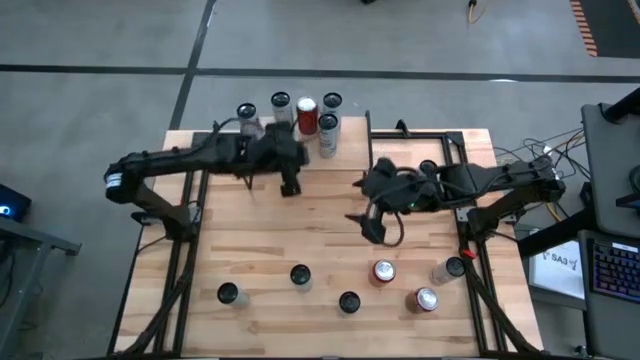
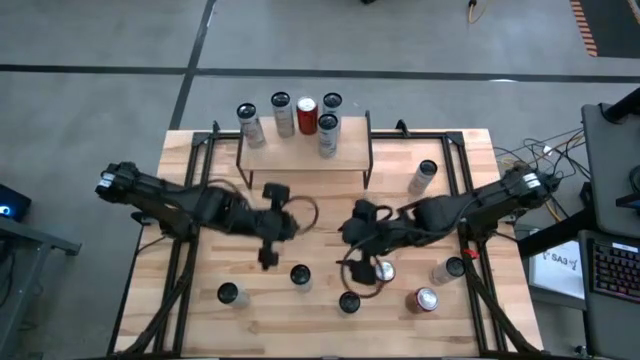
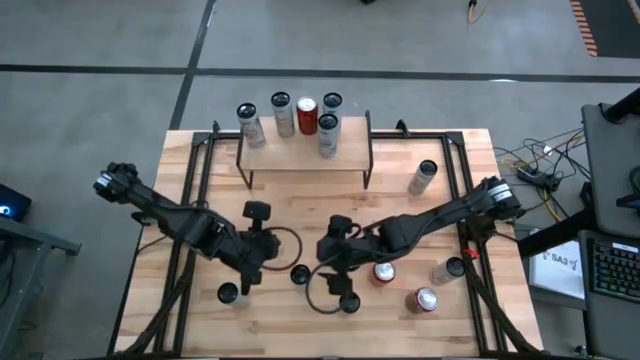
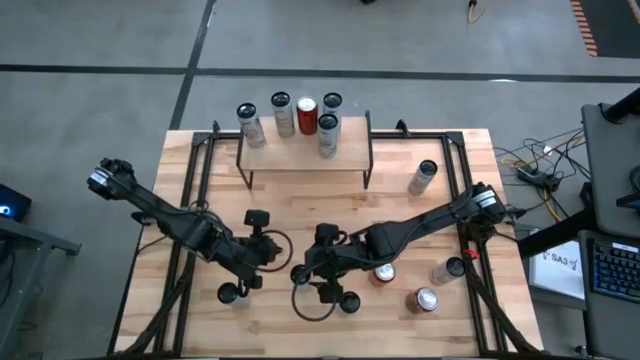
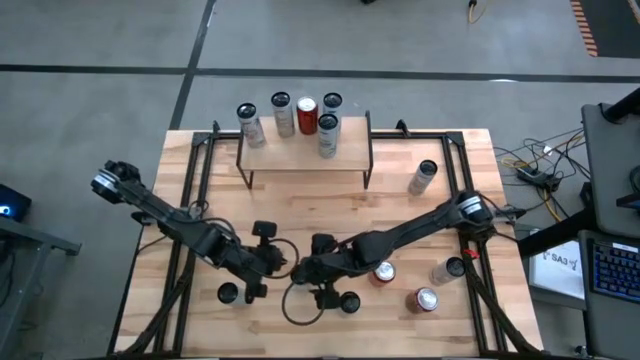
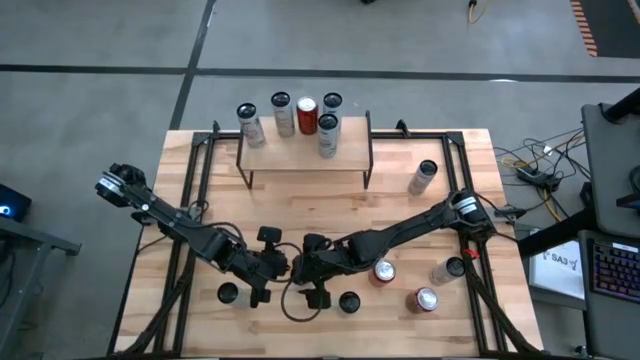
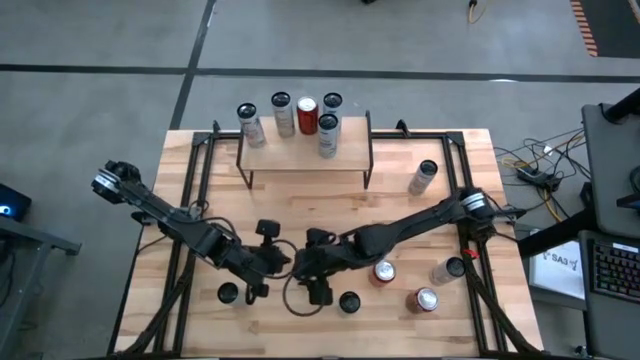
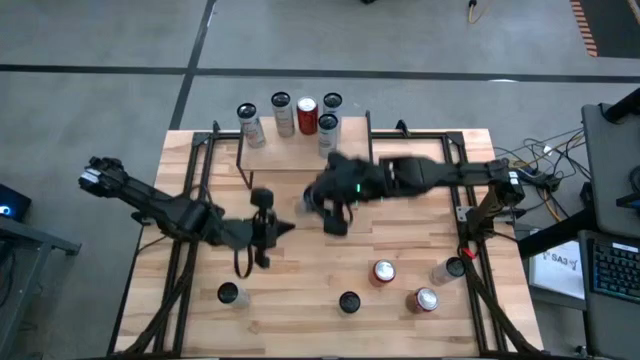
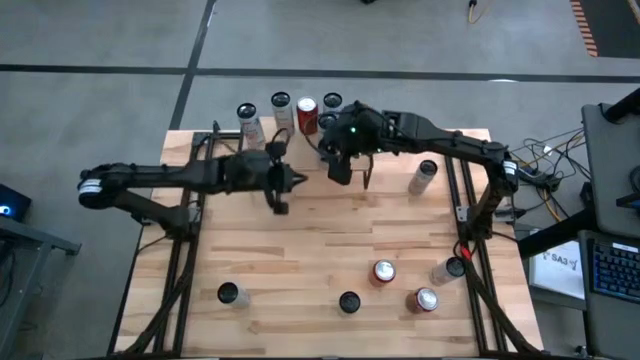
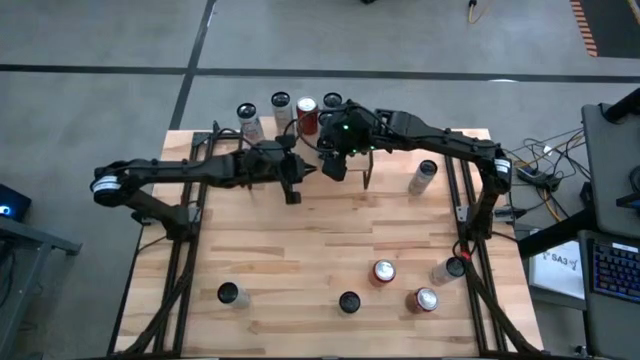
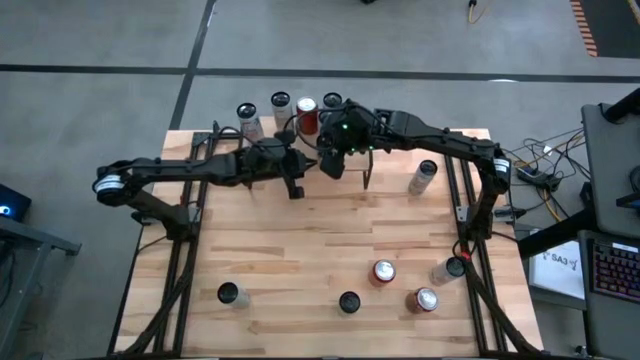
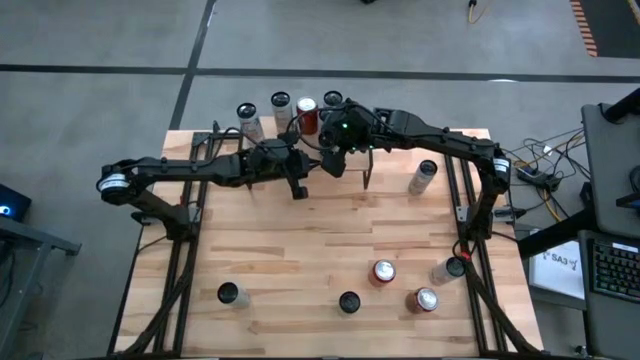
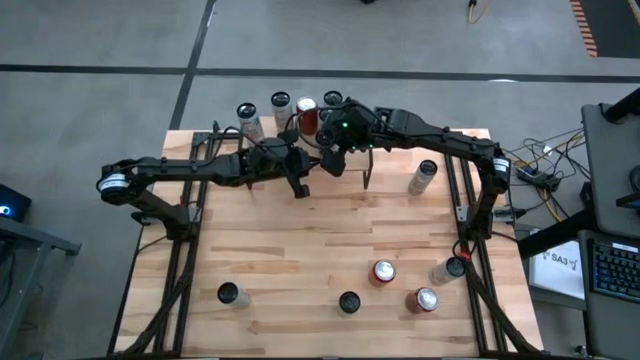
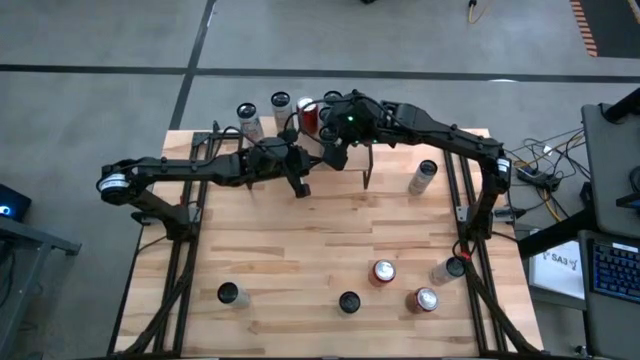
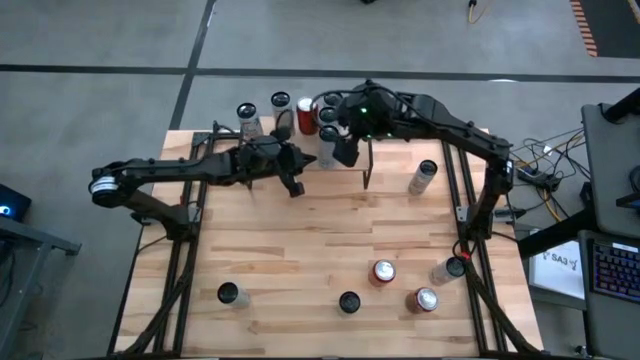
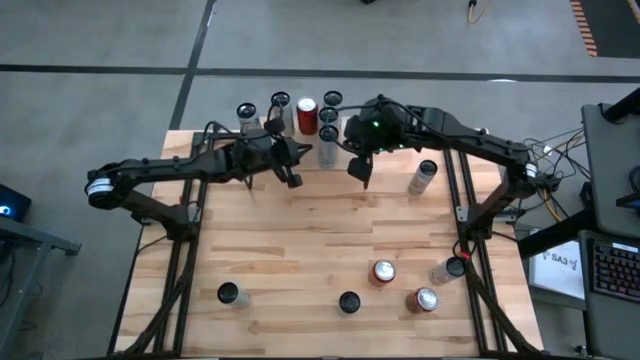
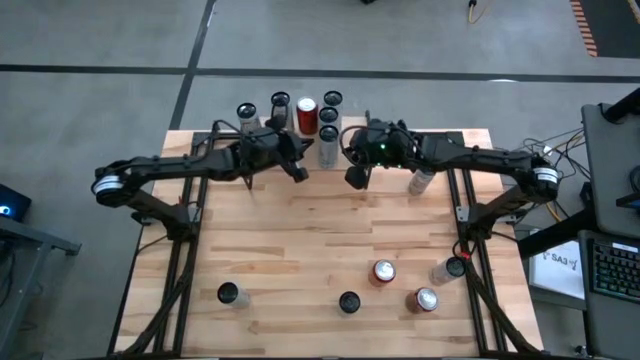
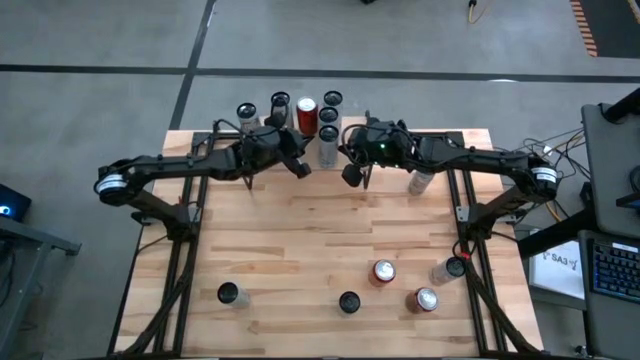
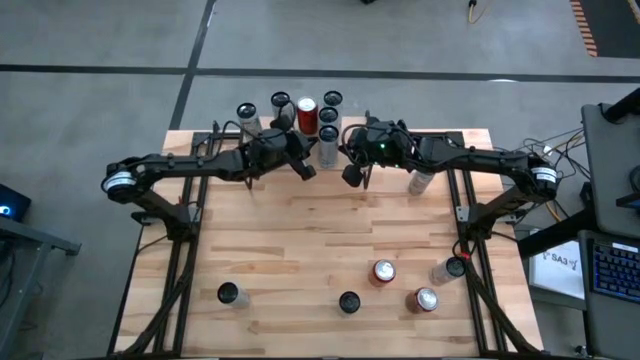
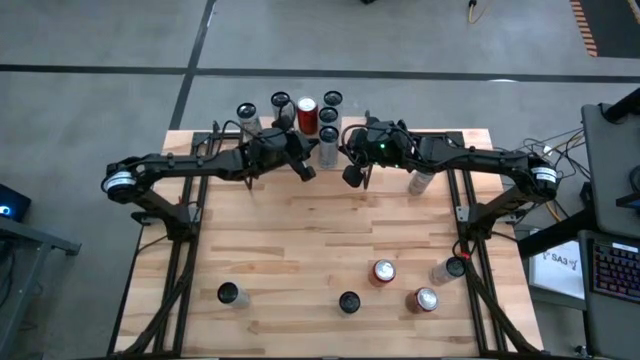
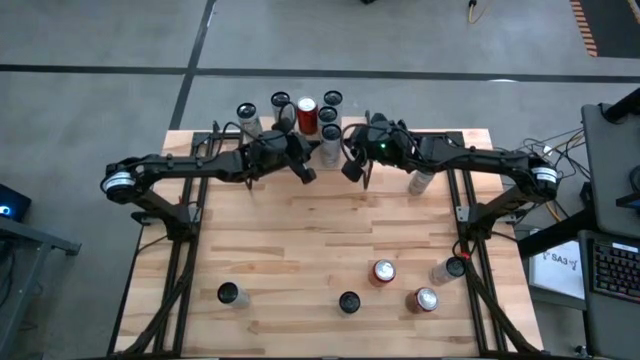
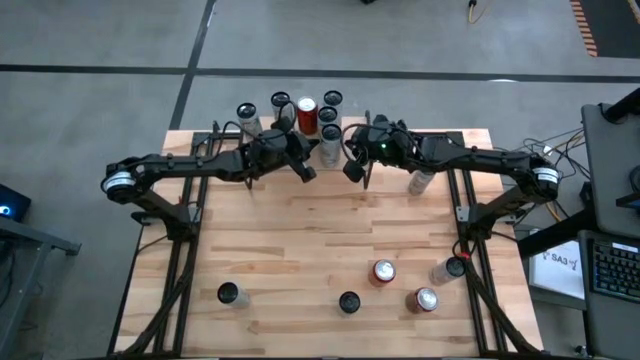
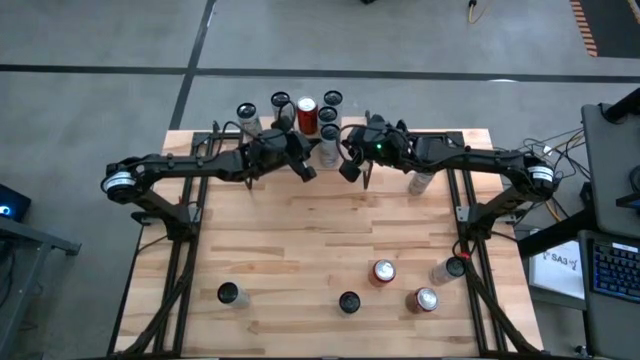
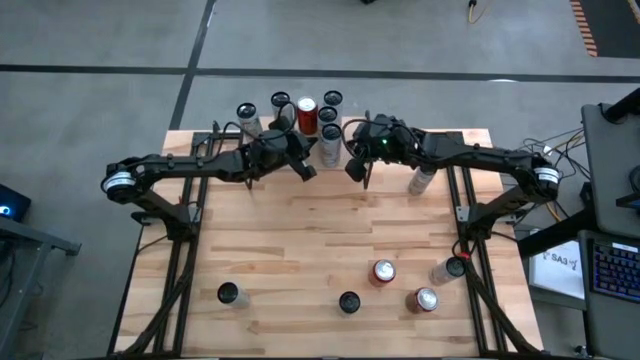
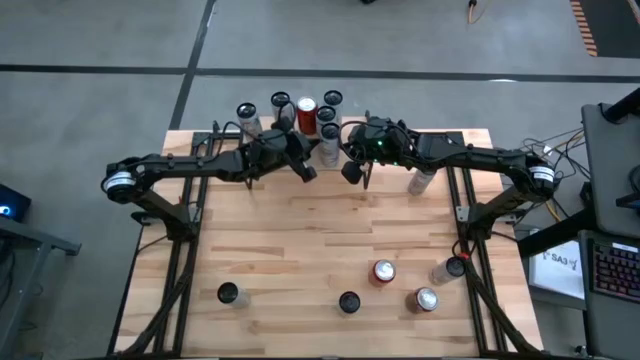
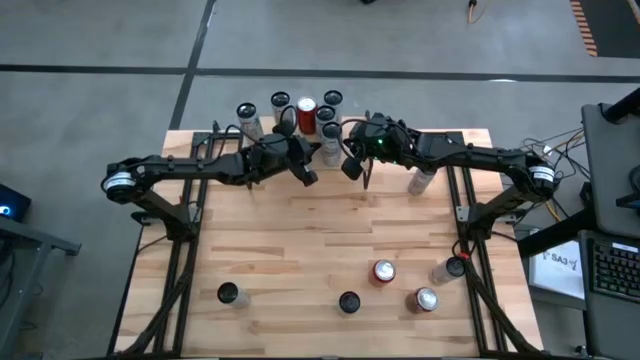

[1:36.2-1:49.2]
Task: Place canned beverage on shelf
Put the white soda can aligned with the other white soda cans on the shelf

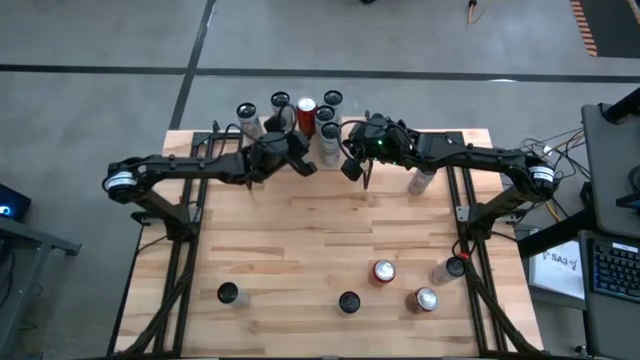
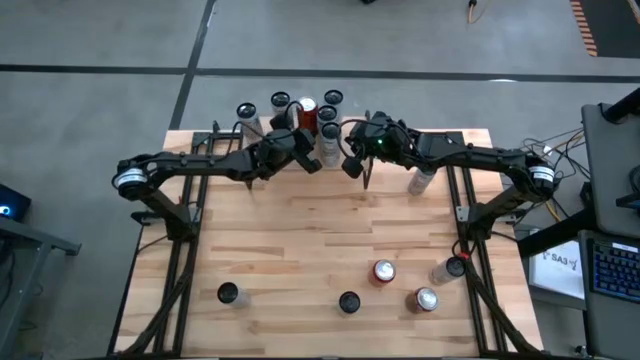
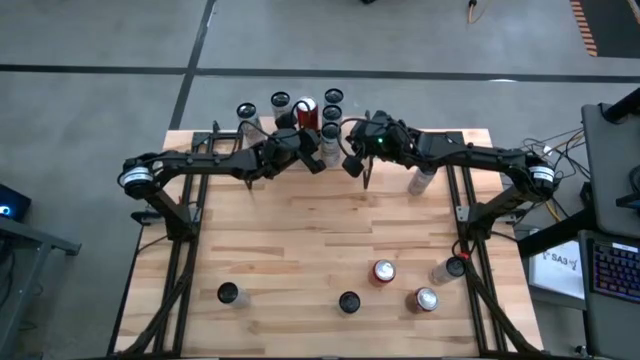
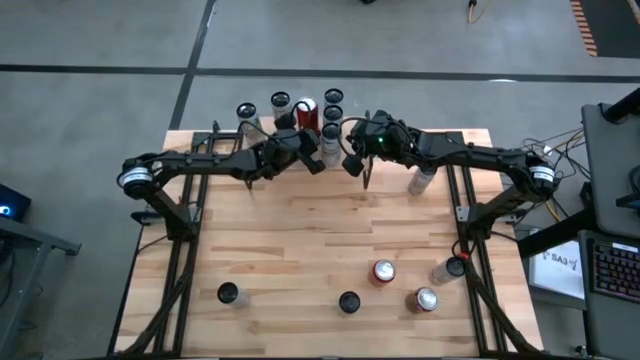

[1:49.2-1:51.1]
Adjust the white soda can

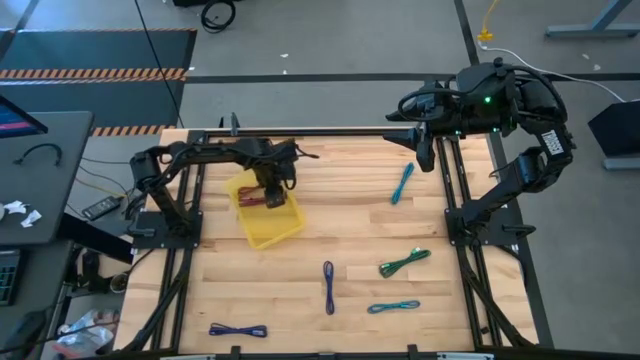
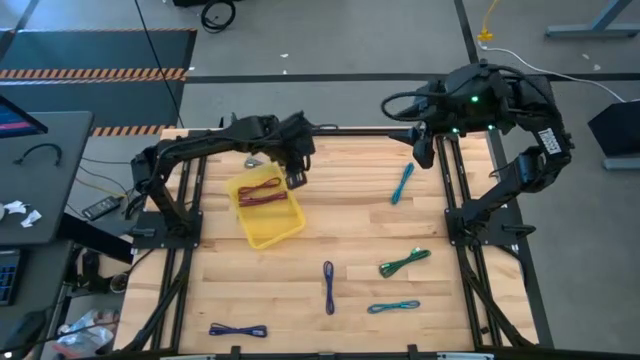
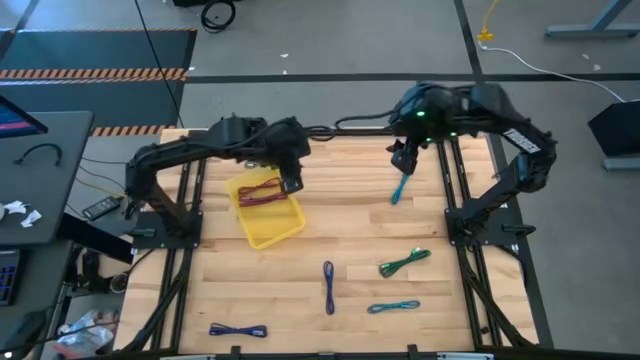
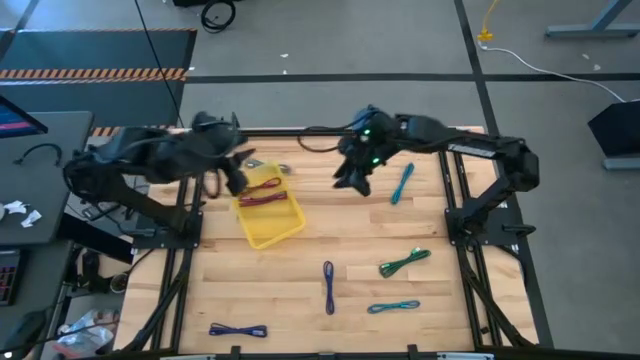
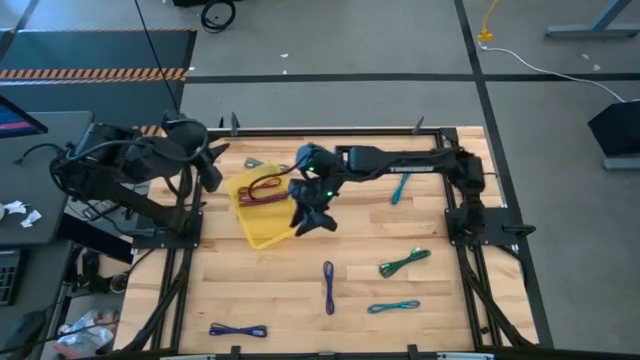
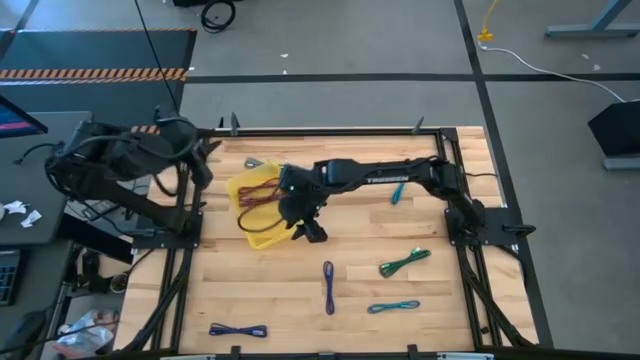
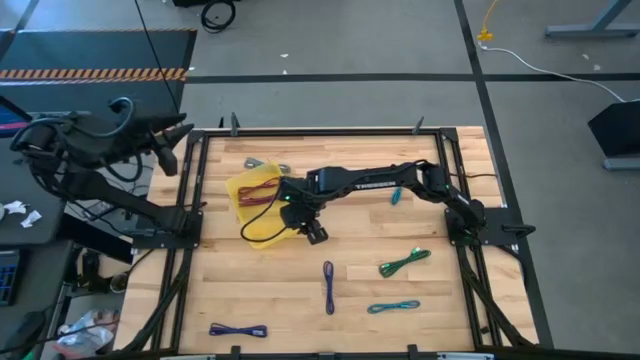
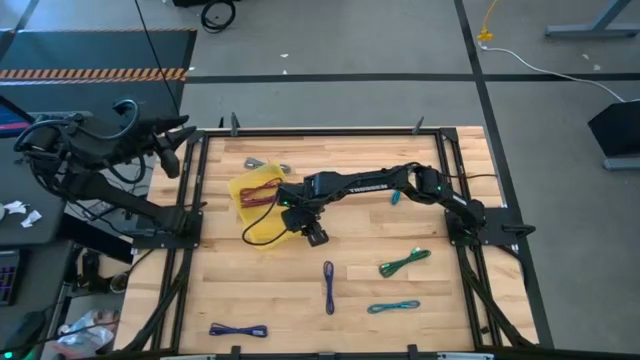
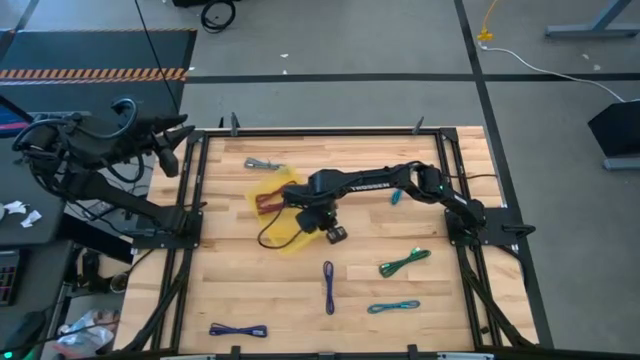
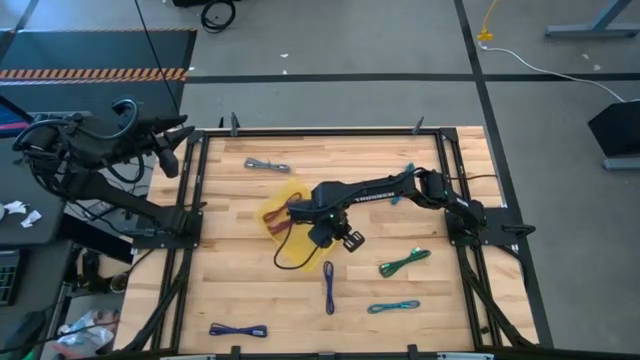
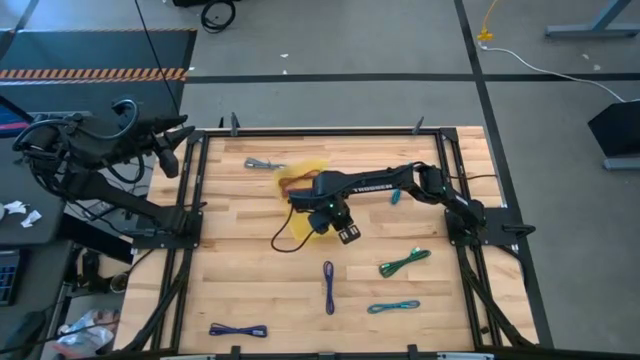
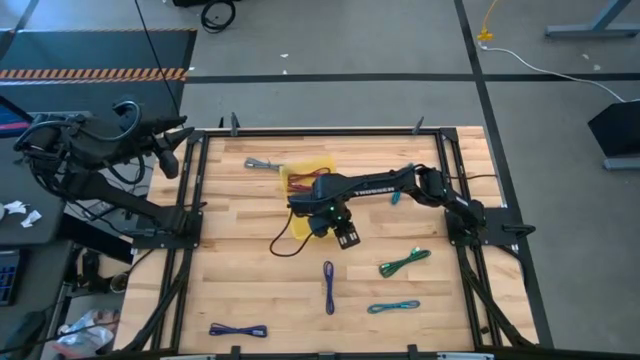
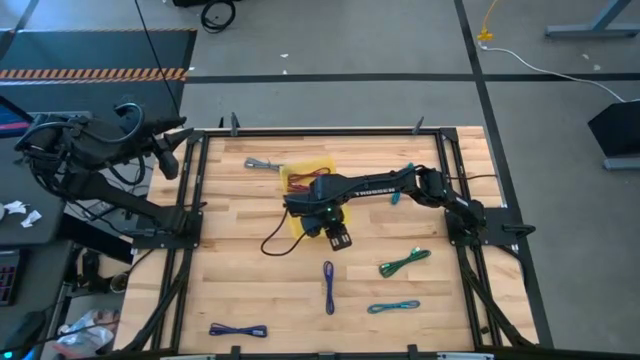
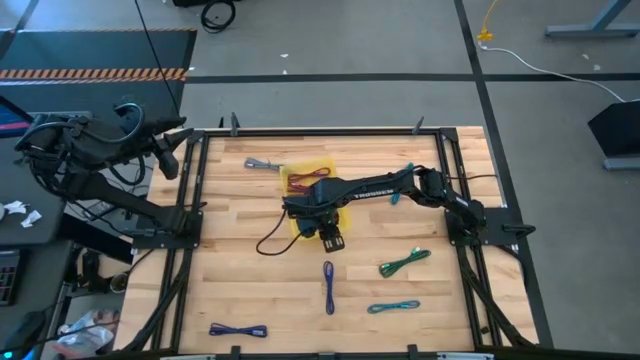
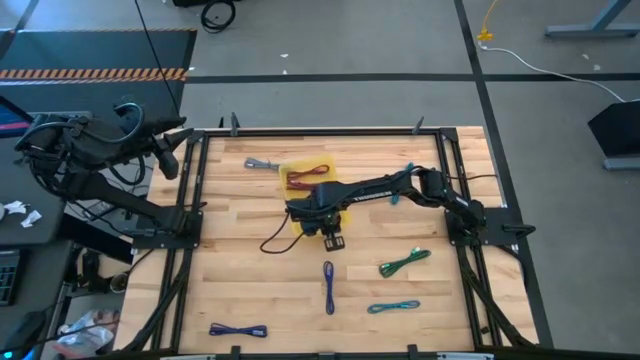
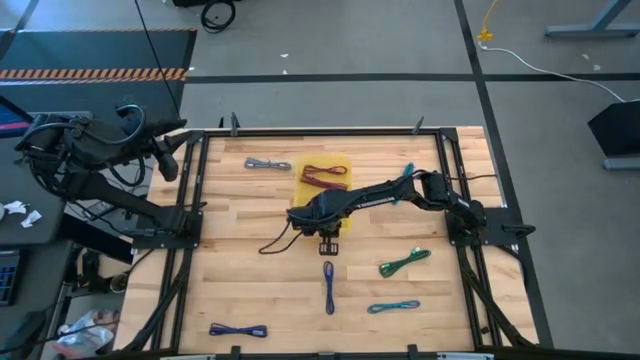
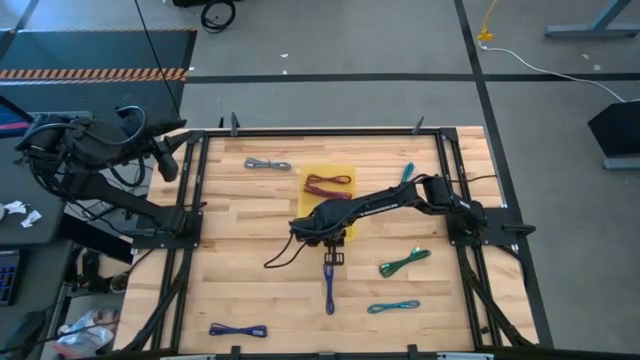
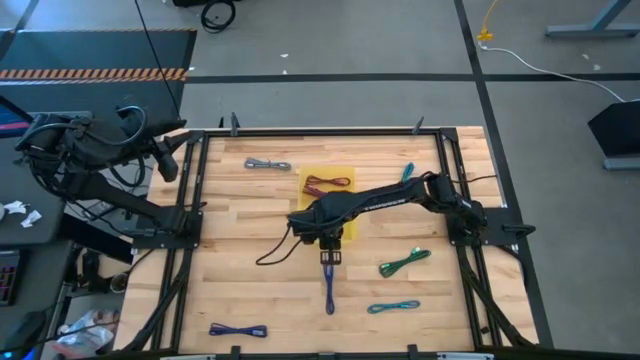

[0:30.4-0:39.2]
Task: Pick and place USB-C Cables
Move the yellow bin to the middle of the table
